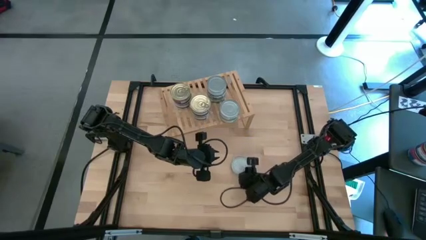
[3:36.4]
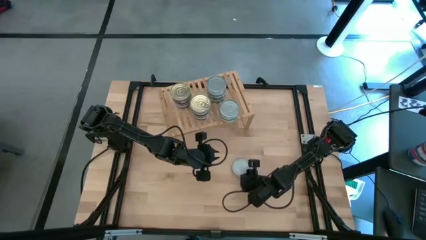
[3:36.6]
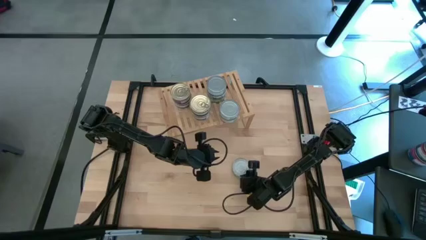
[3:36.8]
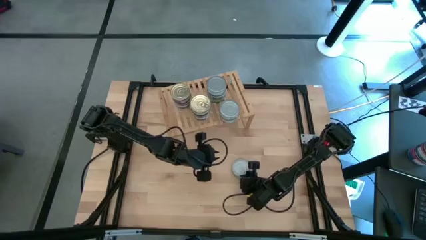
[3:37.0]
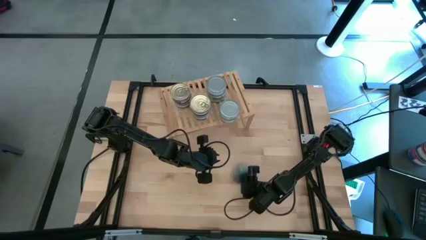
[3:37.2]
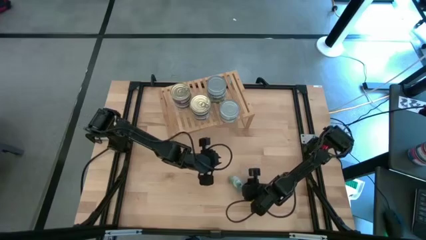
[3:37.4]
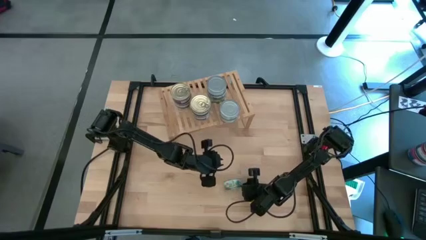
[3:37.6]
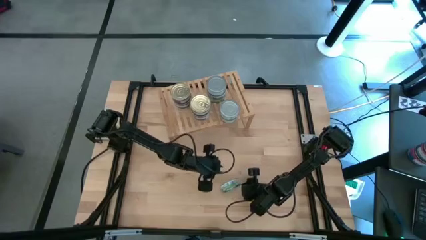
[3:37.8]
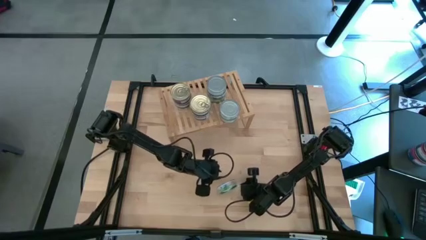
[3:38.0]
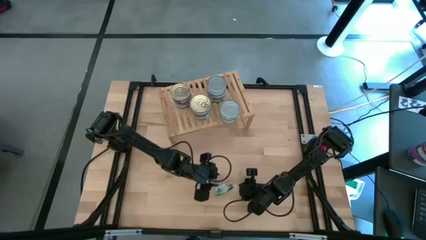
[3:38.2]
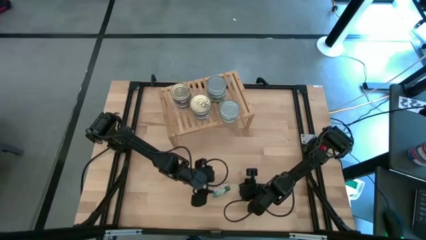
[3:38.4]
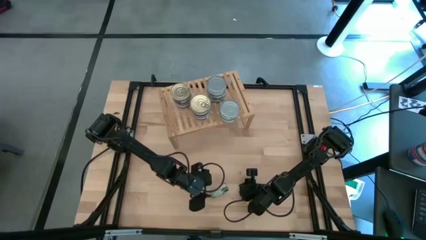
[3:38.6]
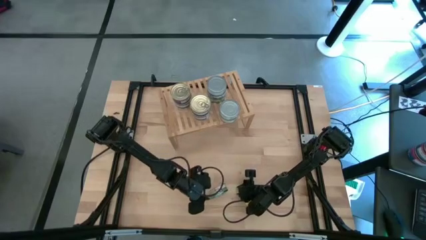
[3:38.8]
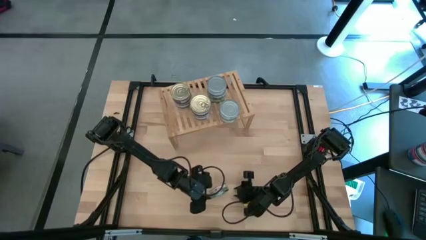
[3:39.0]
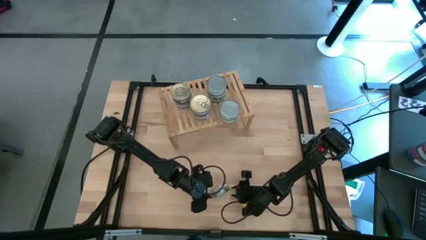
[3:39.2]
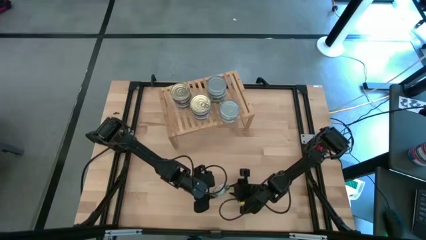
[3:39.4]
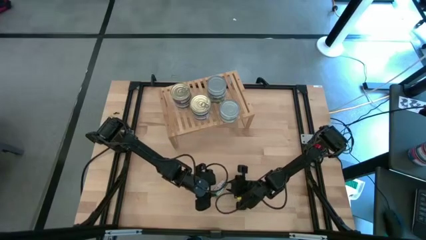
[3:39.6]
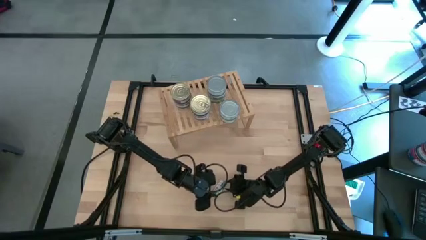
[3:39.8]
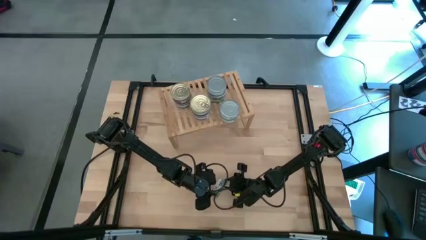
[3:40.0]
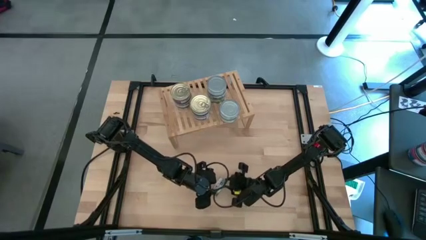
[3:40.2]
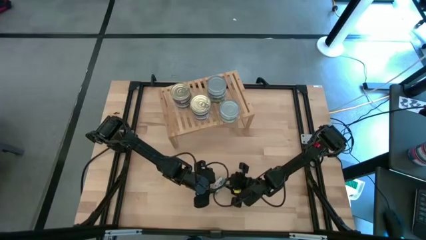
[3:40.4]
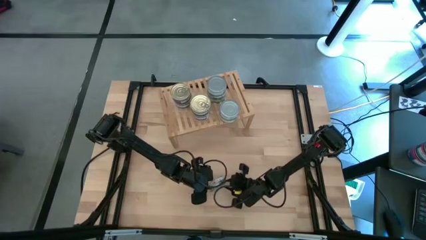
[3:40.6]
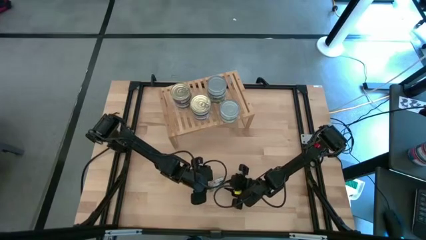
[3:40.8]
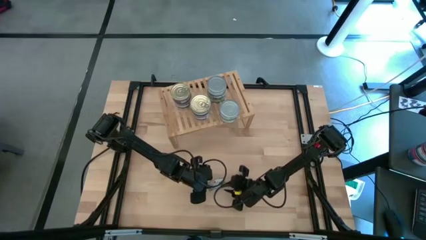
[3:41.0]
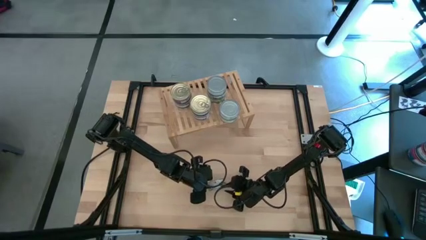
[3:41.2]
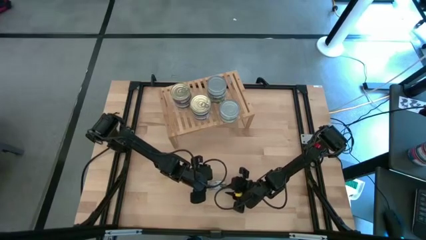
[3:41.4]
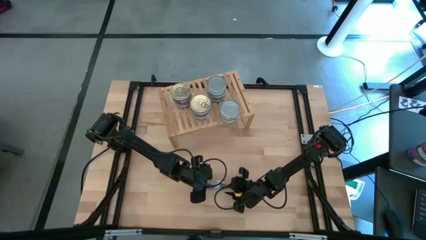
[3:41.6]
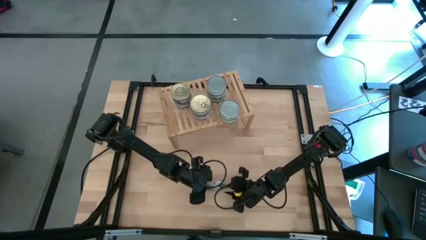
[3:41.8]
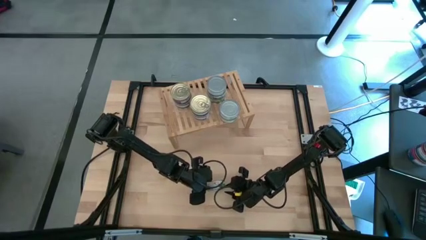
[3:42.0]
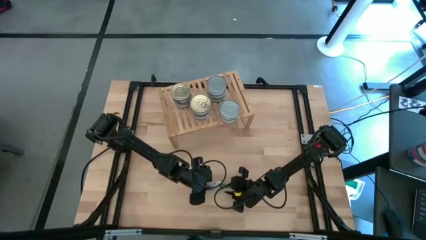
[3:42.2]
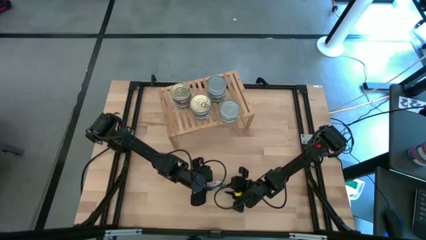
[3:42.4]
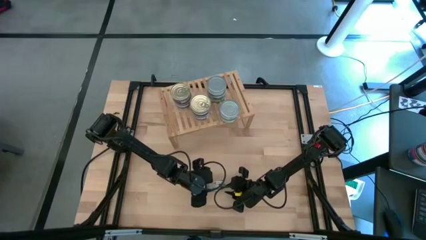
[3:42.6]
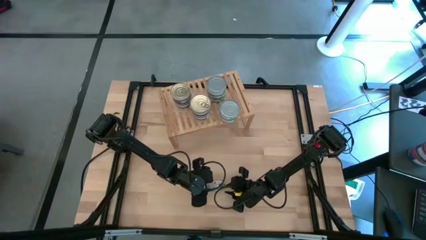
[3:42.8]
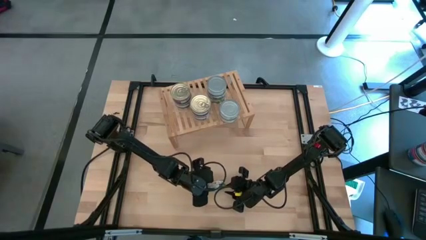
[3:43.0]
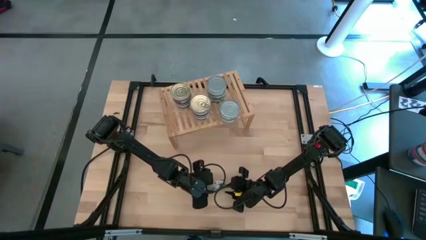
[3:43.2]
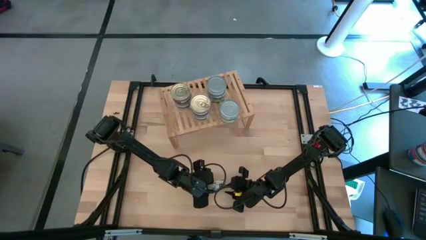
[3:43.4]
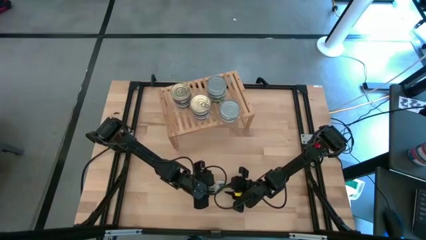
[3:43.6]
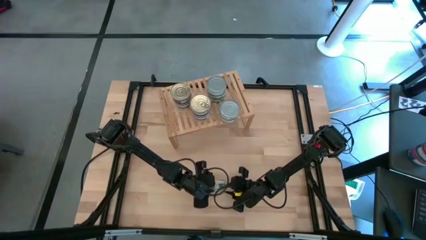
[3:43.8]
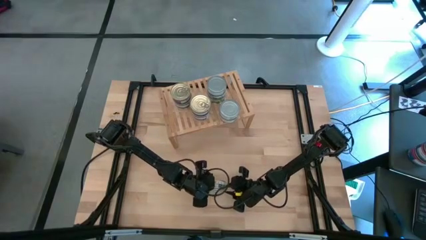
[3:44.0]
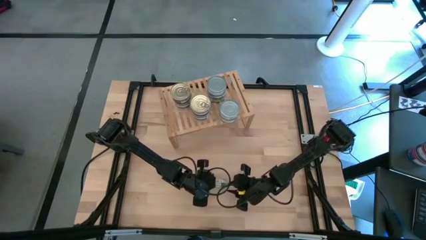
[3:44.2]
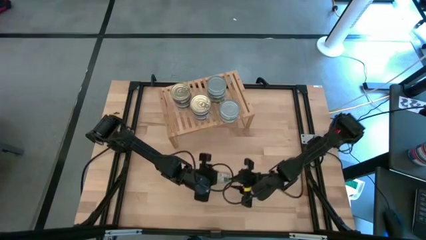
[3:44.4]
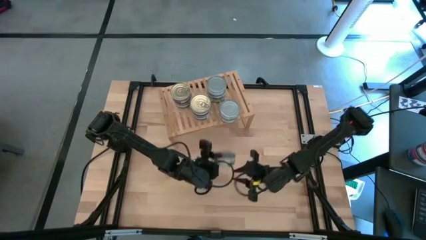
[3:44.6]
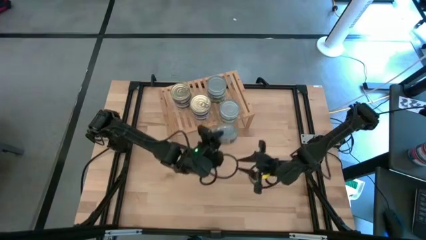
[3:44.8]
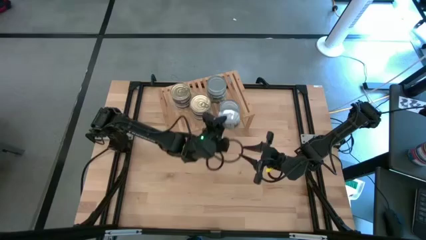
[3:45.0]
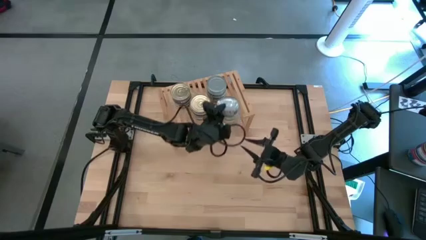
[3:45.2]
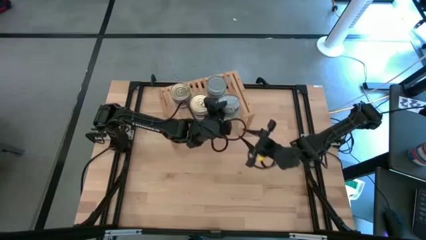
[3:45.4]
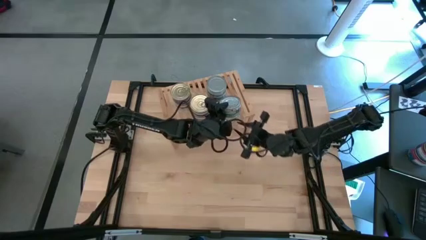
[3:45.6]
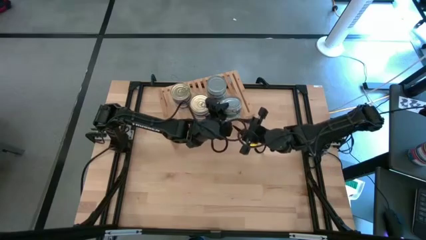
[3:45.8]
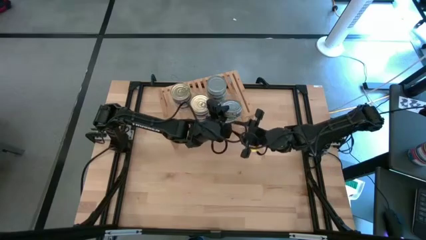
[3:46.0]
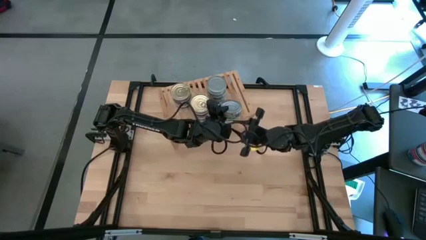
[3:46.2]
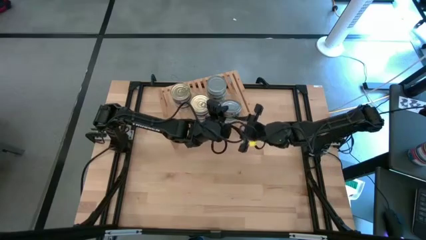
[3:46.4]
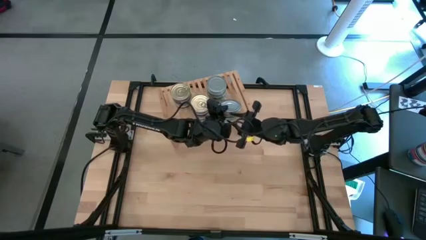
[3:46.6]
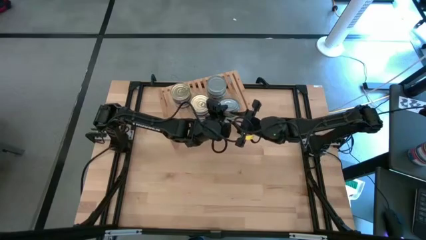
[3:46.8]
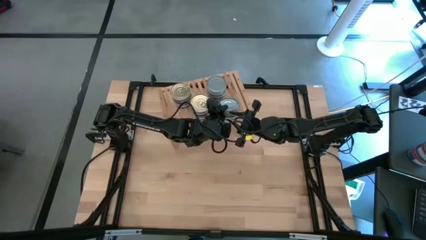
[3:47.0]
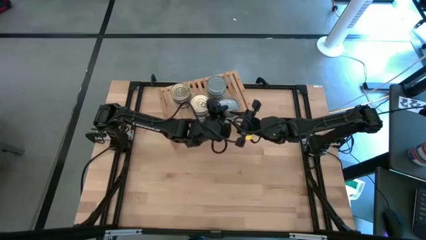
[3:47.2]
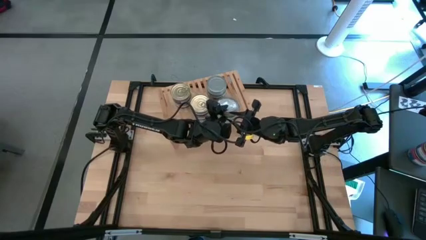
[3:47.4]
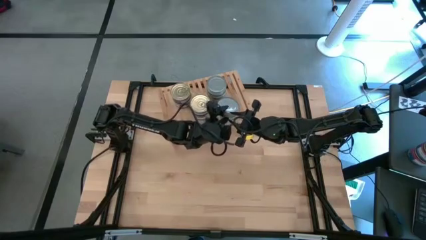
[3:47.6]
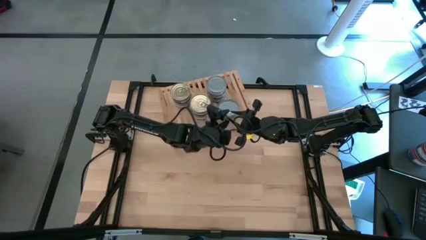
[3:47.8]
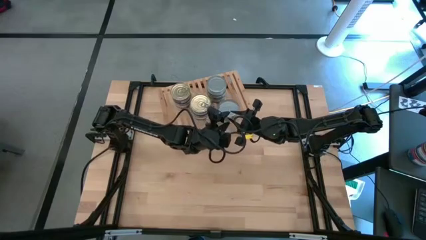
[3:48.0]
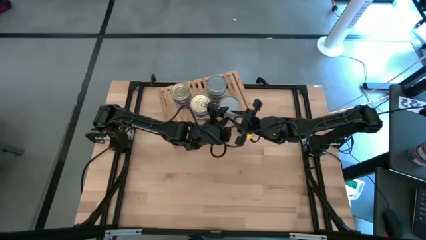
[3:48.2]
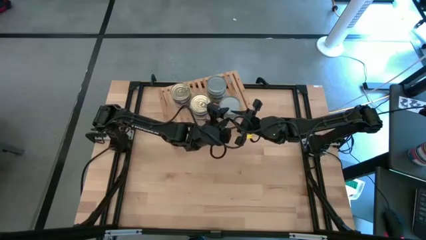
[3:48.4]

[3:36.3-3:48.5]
Task: Stack canned seafood by type on shelf
Stack the green tuna can on top of the green tuna can on the shelf

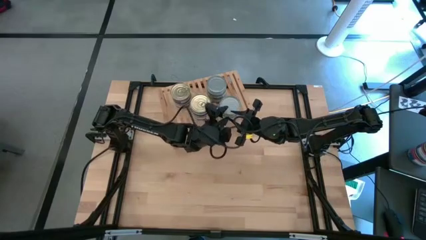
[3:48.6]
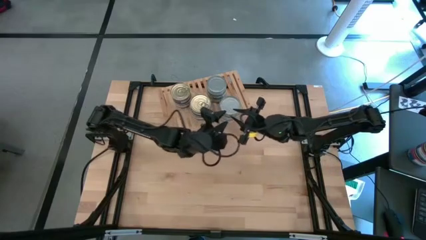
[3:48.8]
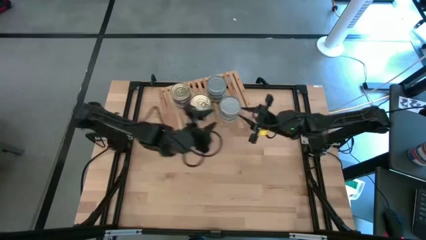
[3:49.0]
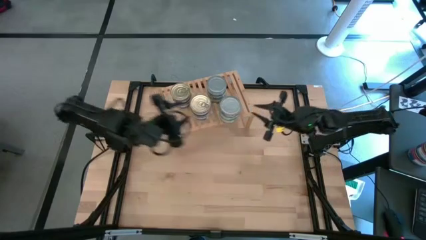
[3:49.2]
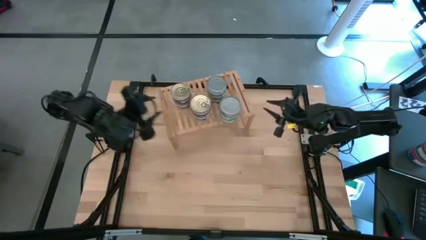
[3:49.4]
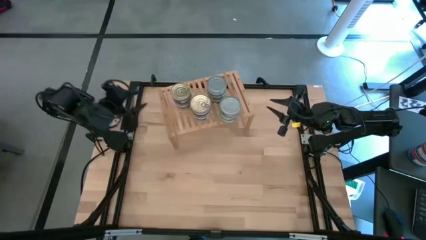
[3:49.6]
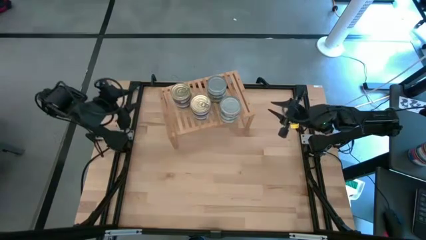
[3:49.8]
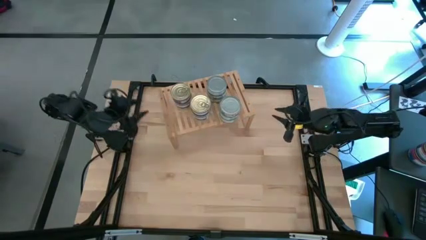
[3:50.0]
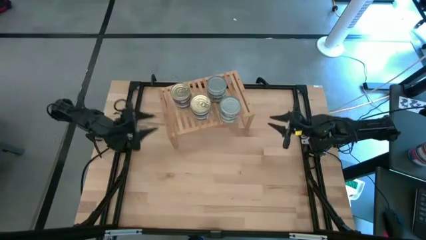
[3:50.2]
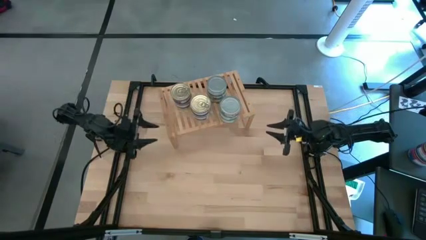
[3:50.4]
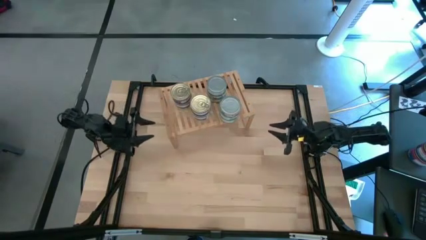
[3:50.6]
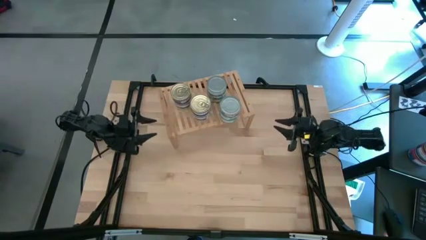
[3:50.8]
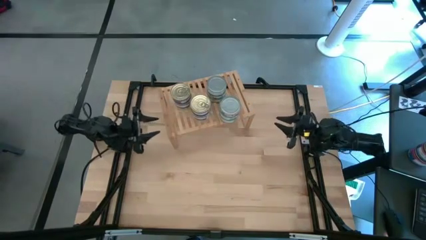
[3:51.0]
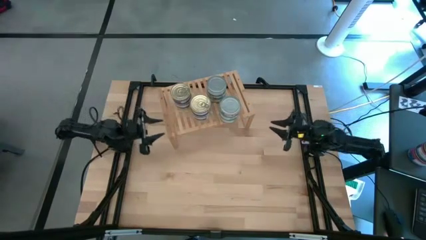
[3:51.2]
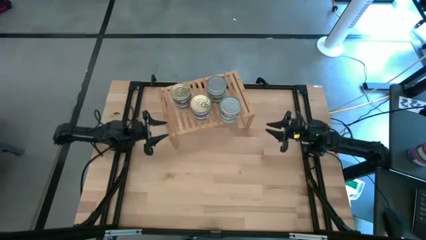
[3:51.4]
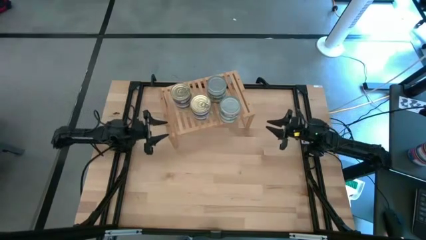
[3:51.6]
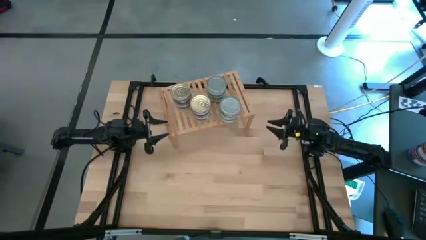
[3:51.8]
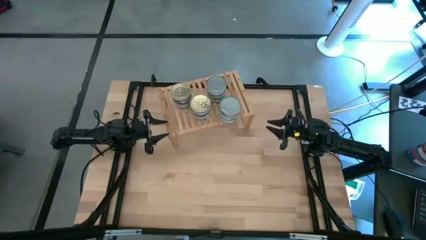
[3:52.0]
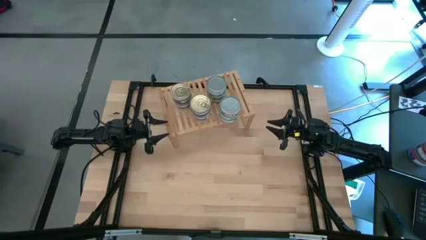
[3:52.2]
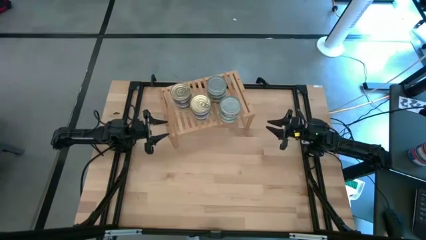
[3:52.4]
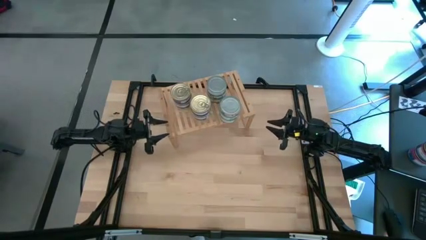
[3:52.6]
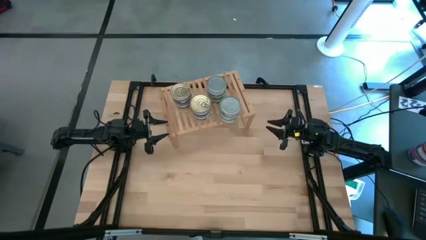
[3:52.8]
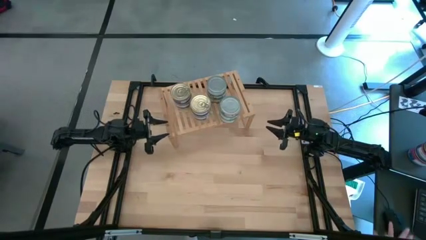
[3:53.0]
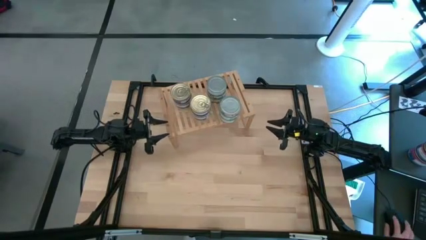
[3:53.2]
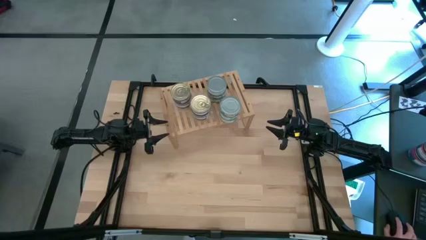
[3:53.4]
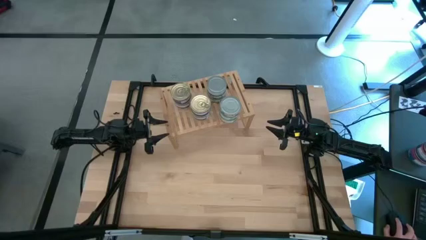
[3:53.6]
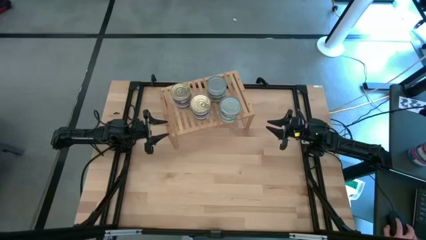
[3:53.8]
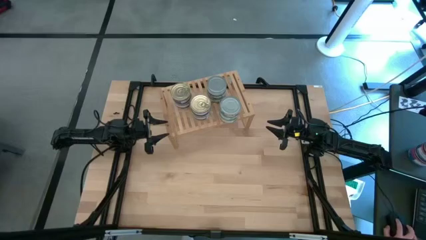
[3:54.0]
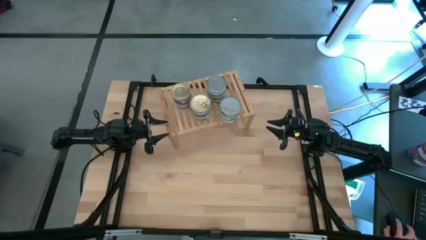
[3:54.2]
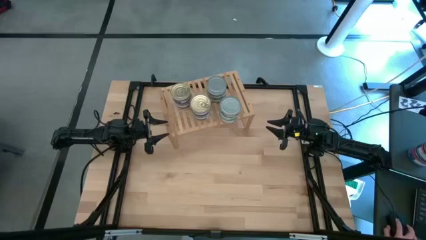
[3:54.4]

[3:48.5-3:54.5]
Return to Home Position
